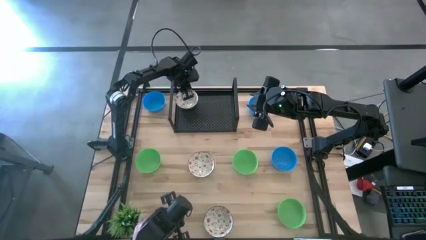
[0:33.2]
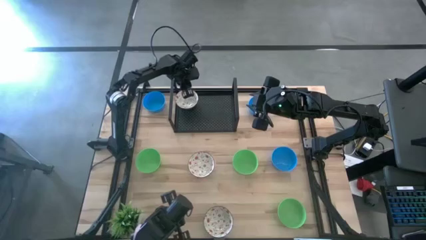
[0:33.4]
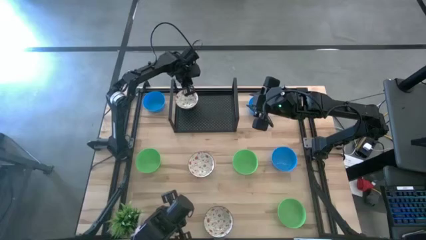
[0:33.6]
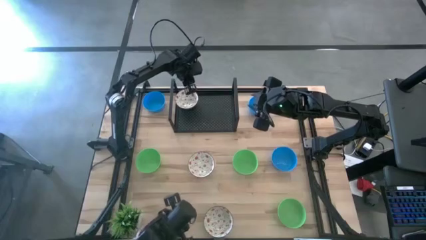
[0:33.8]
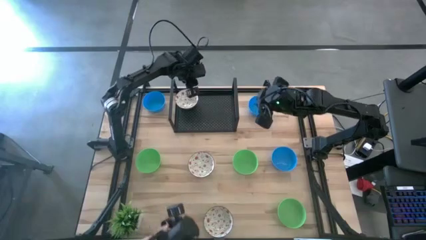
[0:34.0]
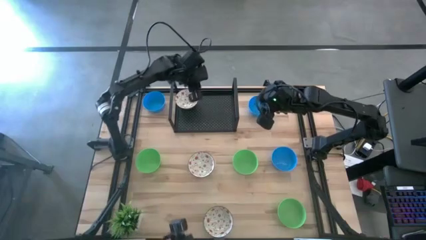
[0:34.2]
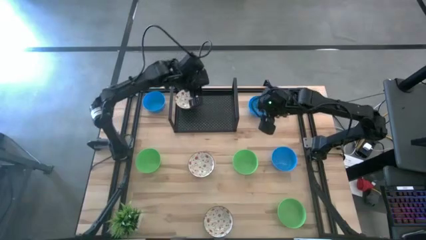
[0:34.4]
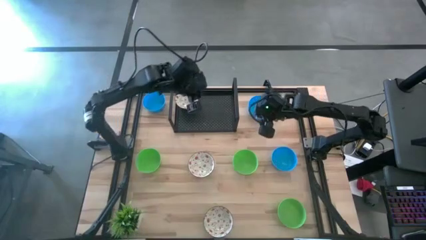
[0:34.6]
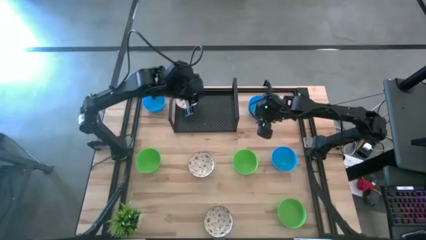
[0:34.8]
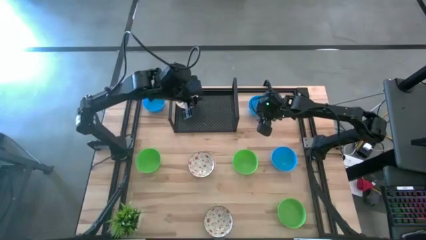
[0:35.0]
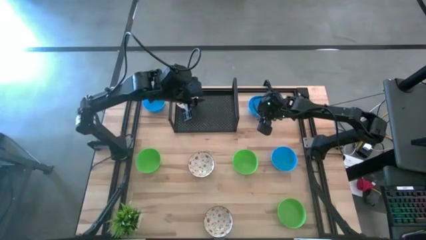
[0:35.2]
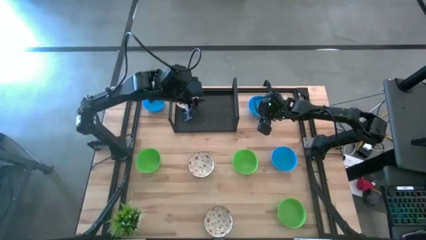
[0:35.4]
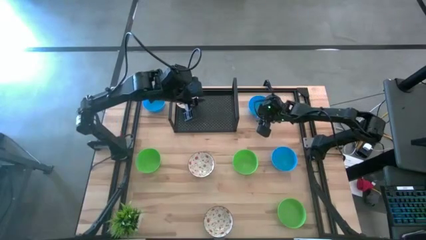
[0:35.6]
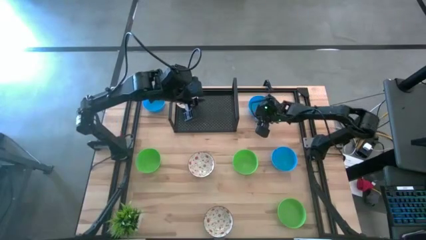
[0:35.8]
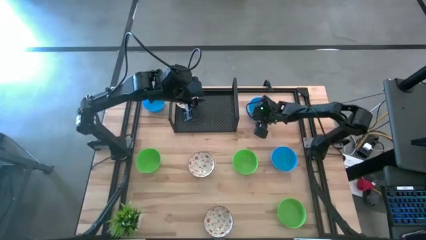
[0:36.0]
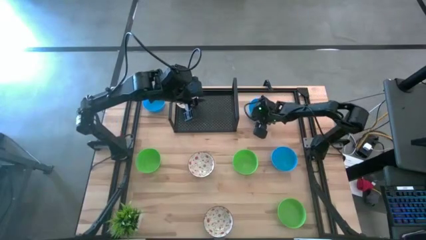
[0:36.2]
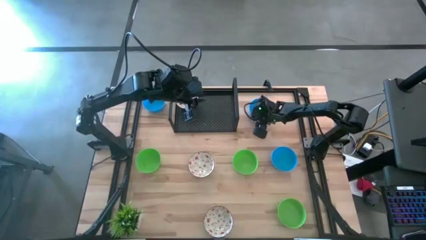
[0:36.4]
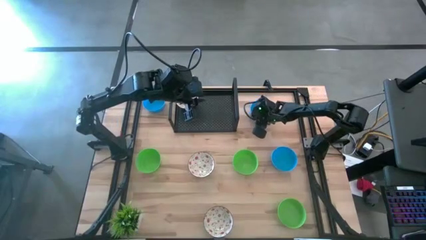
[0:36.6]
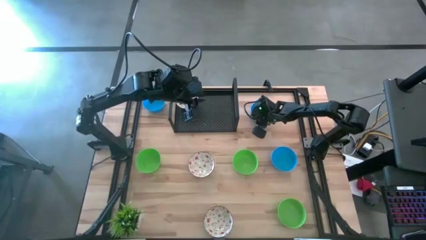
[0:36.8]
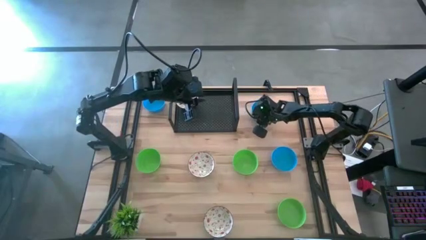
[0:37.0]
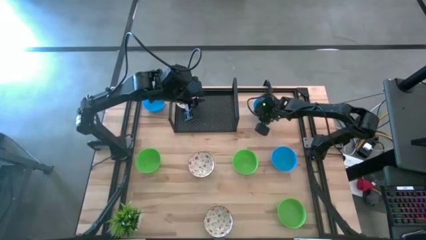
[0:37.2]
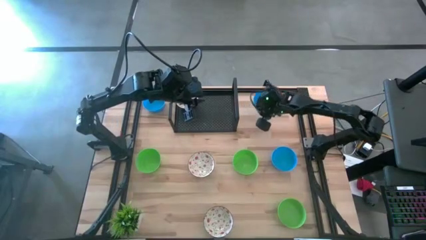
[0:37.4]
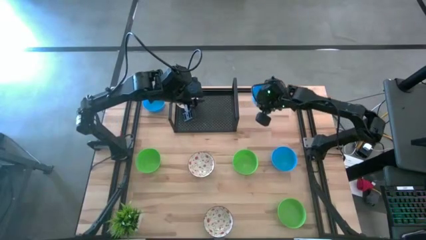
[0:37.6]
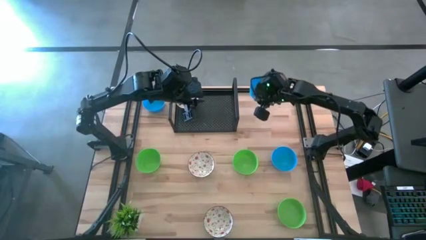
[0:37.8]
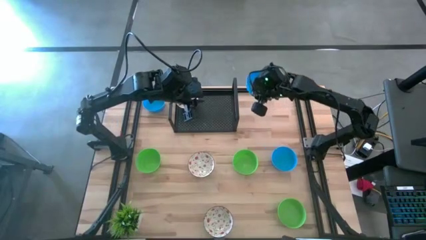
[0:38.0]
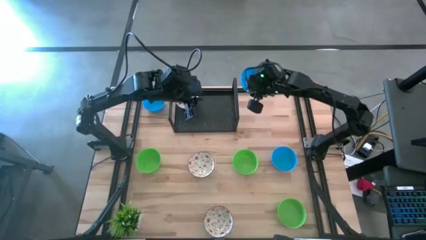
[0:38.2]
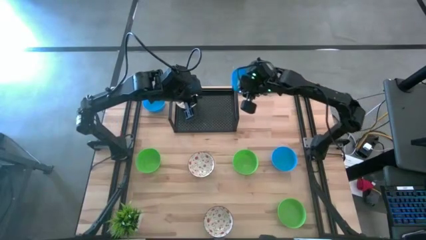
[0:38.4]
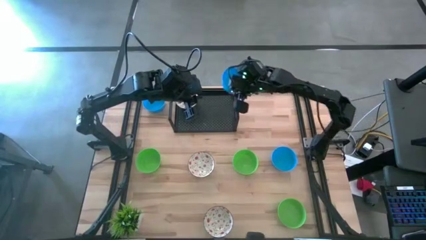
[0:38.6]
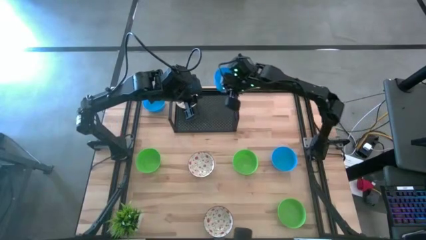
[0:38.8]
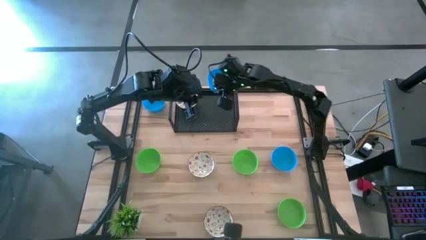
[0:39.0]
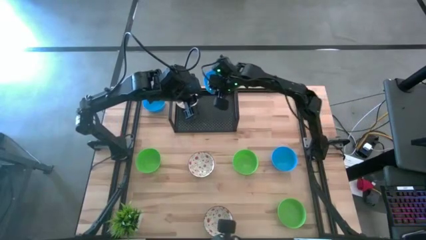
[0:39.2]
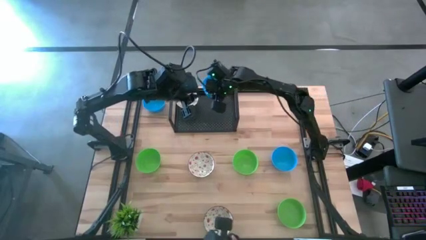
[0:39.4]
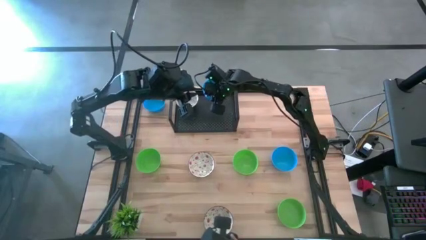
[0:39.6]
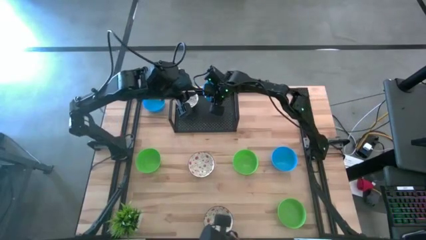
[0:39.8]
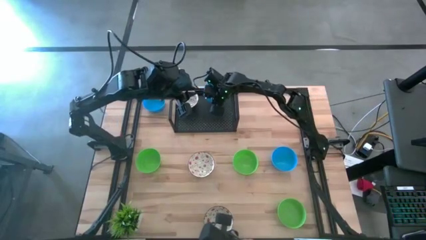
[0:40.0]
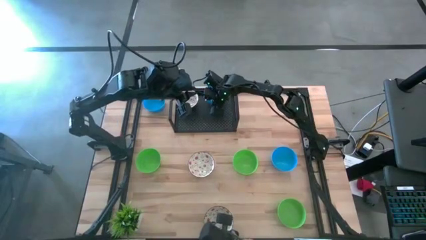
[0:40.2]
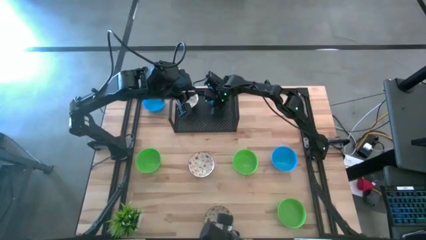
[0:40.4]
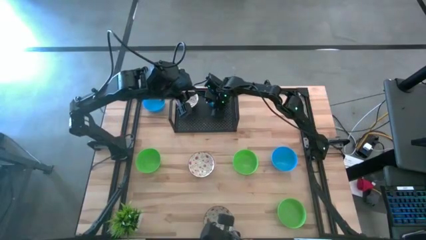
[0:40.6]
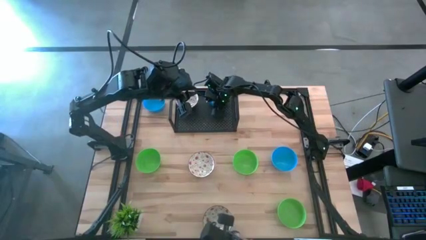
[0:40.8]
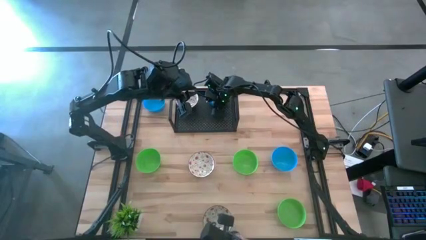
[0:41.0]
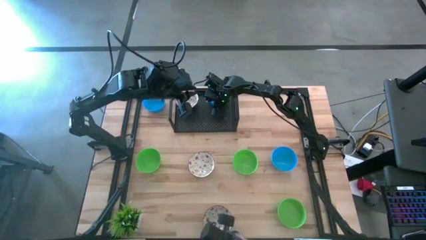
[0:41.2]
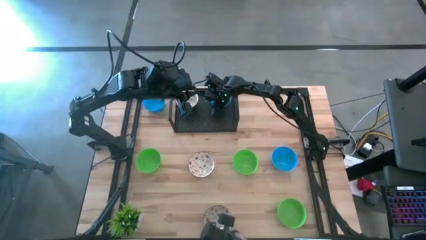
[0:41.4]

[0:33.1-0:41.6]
Task: Pick & Place Mini bowls
Put the top right blue bowl on the shelf

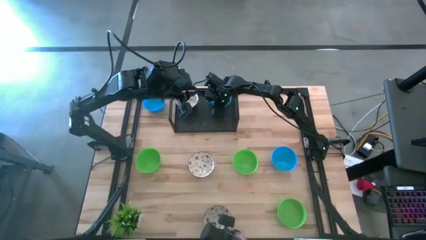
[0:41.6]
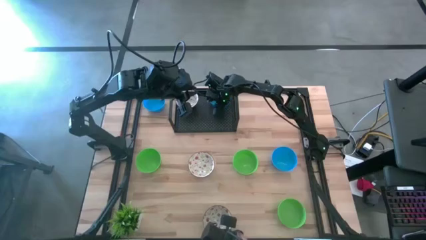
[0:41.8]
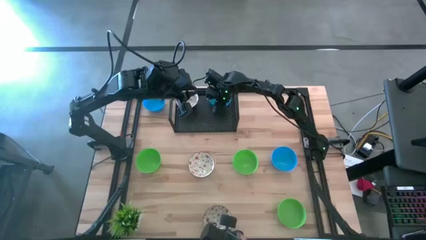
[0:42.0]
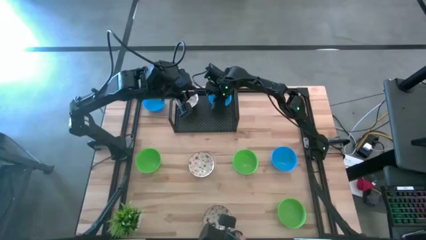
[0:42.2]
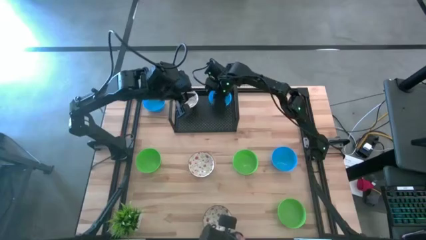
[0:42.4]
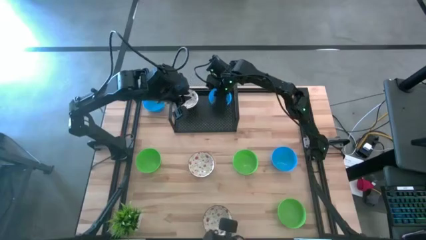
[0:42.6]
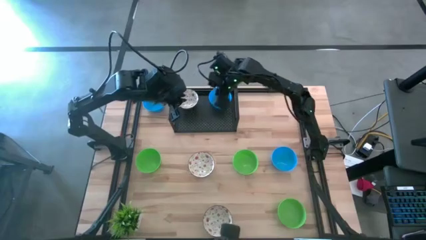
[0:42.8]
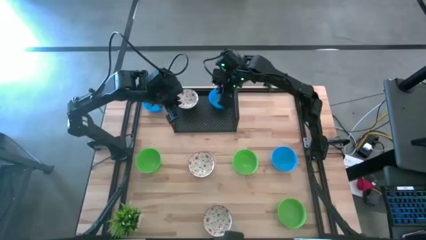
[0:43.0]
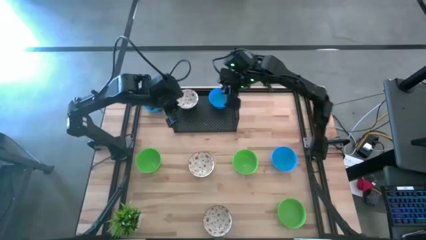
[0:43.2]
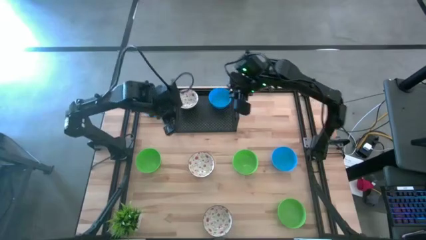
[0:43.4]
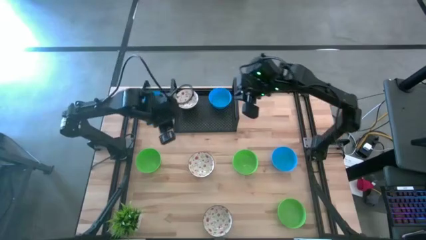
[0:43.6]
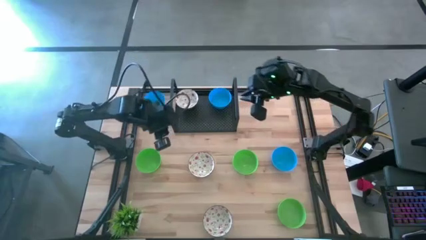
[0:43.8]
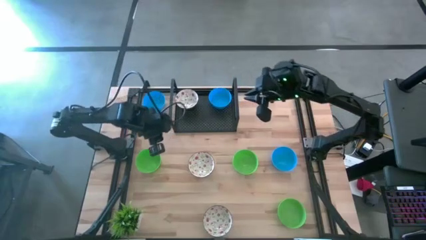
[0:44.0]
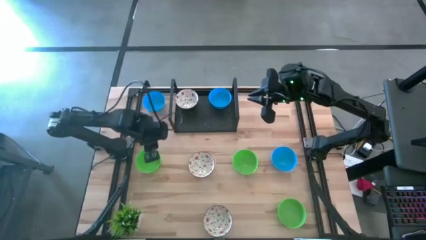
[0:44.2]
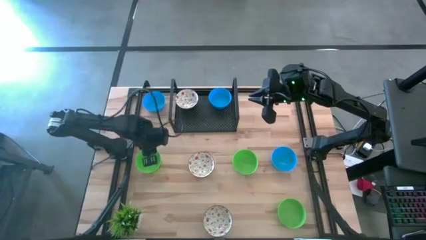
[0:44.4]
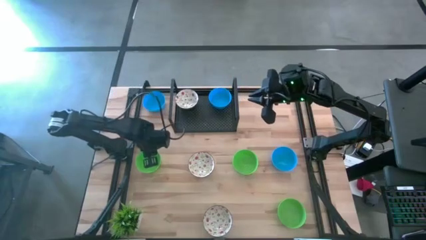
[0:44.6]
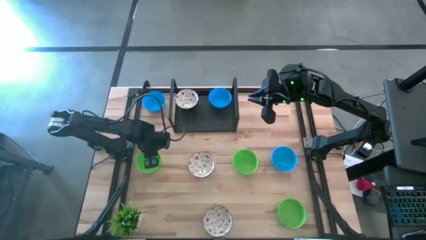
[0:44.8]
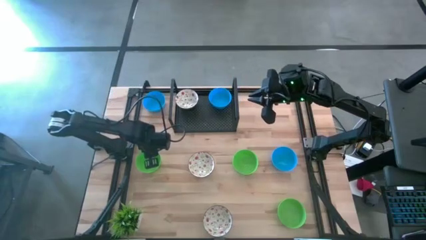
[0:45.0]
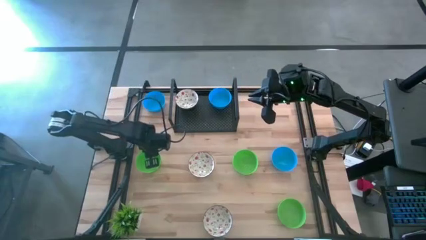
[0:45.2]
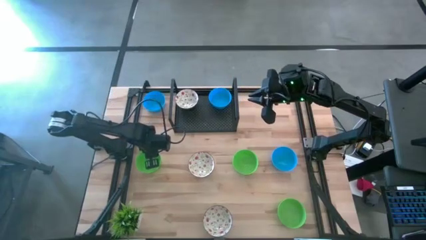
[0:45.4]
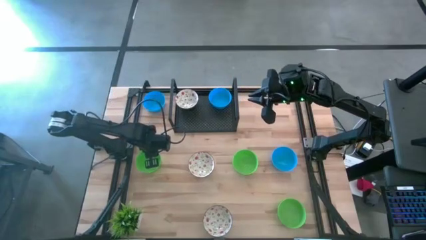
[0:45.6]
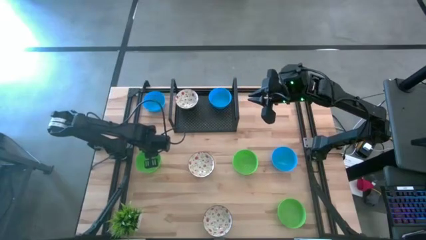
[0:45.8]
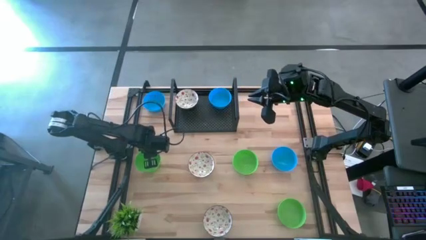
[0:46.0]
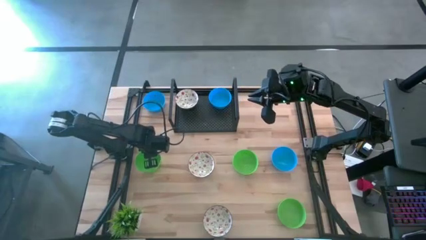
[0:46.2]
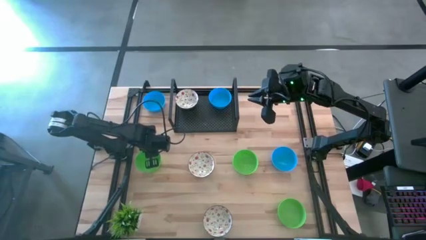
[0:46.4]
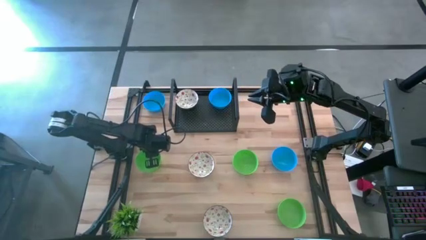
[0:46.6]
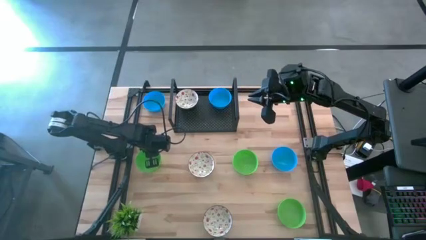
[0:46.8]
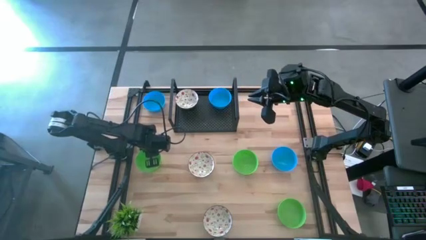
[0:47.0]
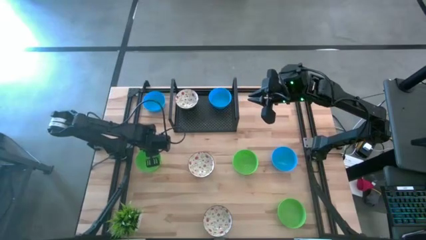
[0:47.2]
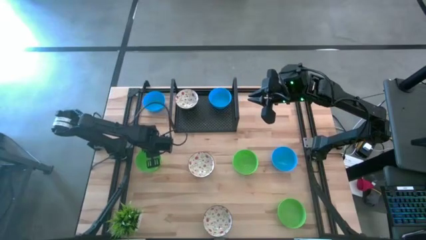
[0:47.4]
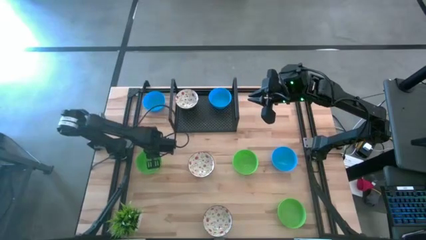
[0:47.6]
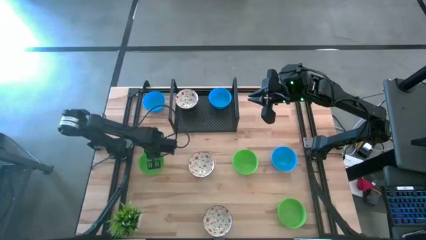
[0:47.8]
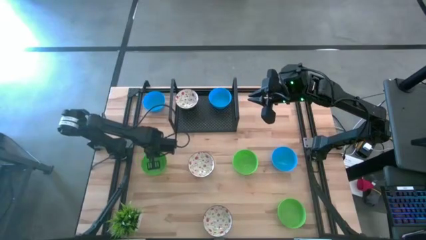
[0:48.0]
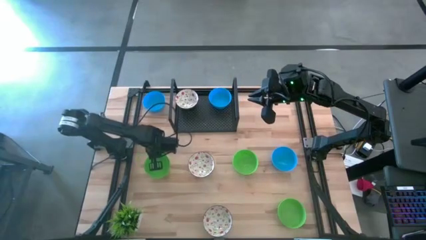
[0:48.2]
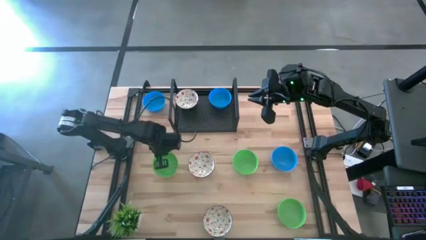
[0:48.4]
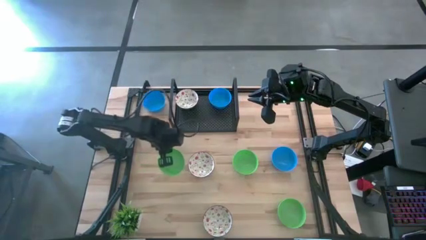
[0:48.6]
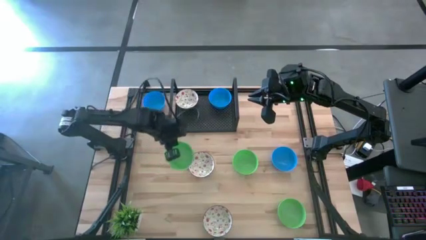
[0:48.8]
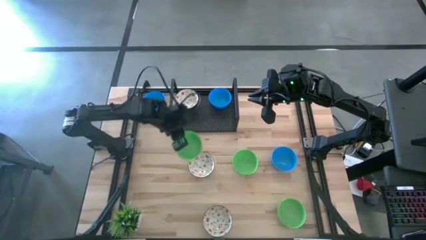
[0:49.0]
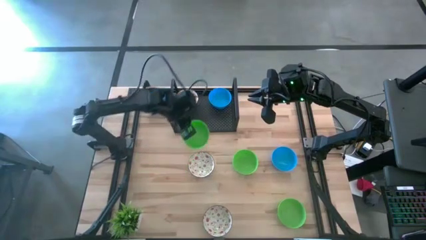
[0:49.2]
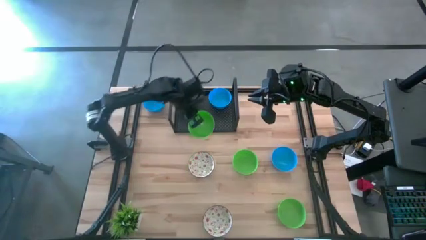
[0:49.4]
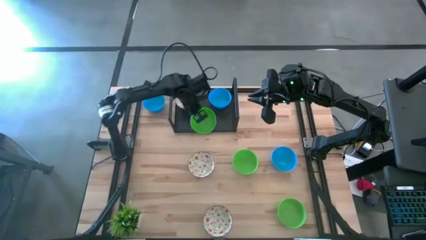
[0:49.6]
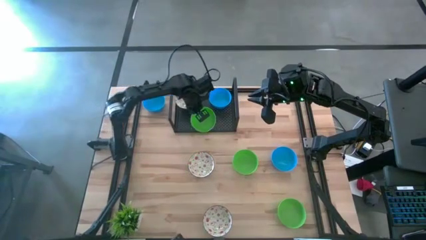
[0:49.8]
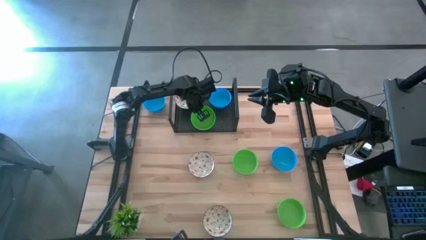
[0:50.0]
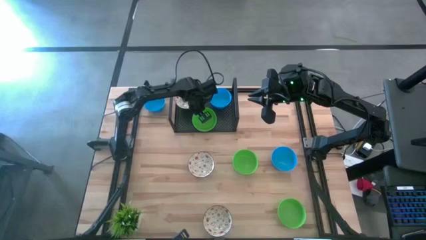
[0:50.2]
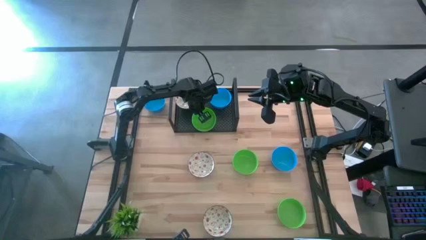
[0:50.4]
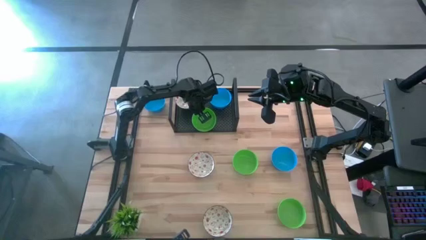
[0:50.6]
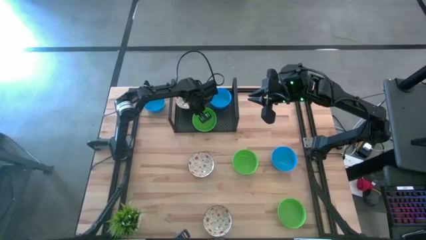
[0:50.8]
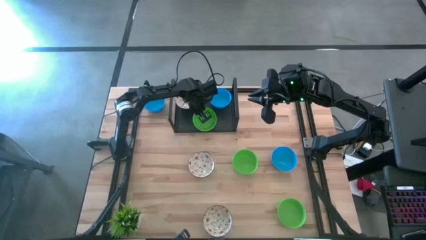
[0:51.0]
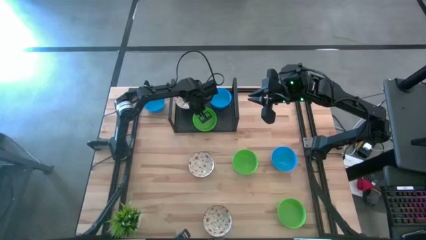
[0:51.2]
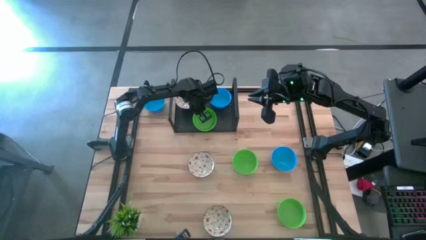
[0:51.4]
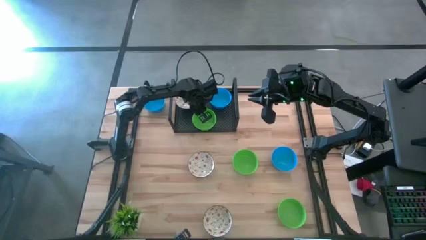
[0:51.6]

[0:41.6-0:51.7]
Put the middle left green bowl on the shelf
